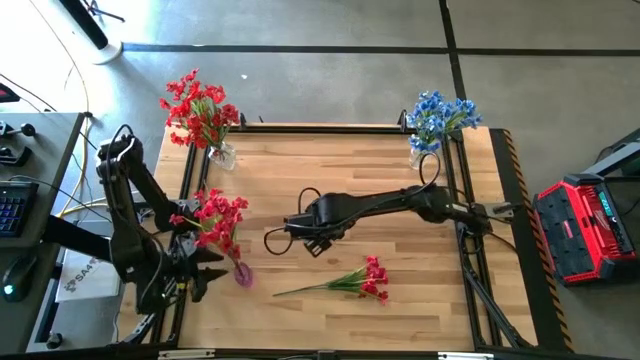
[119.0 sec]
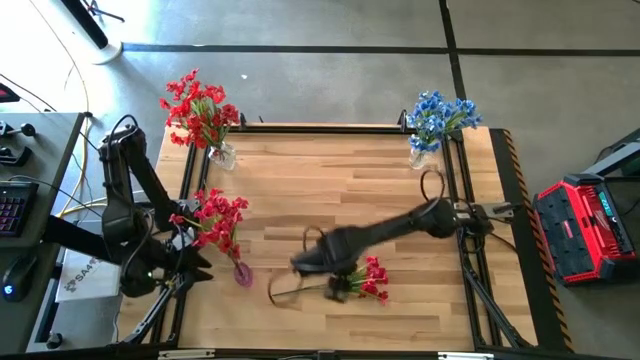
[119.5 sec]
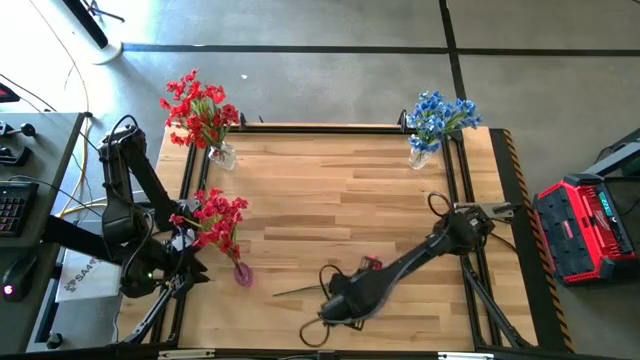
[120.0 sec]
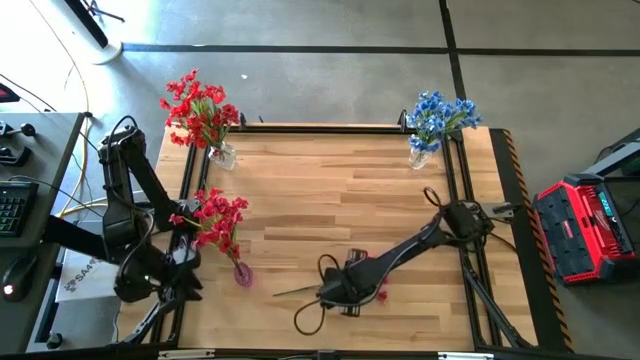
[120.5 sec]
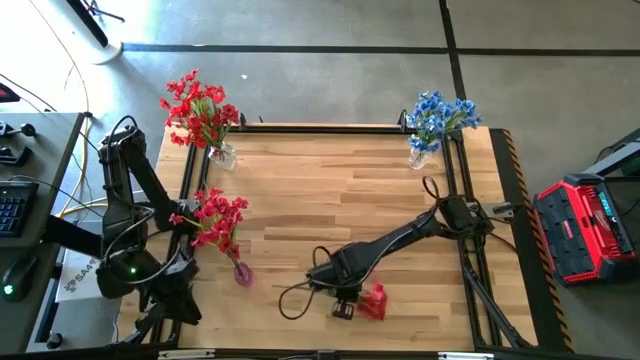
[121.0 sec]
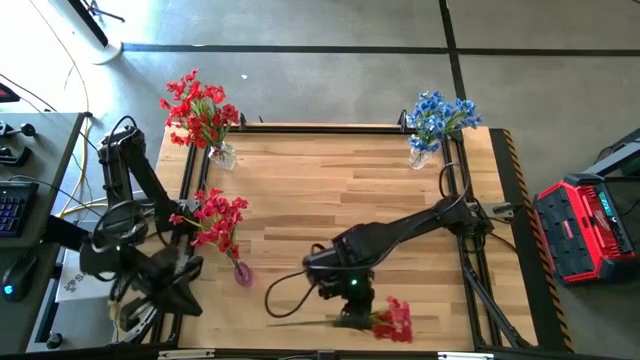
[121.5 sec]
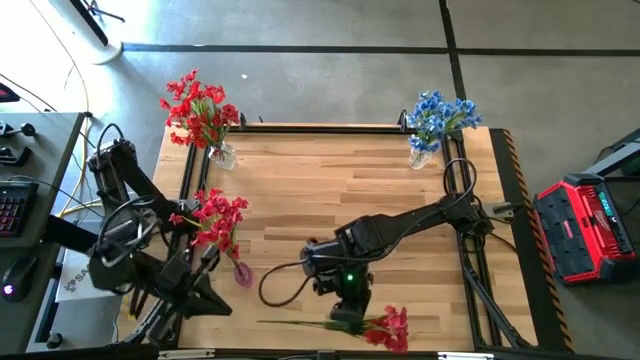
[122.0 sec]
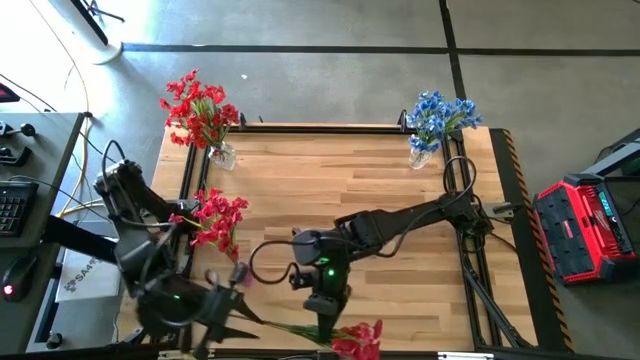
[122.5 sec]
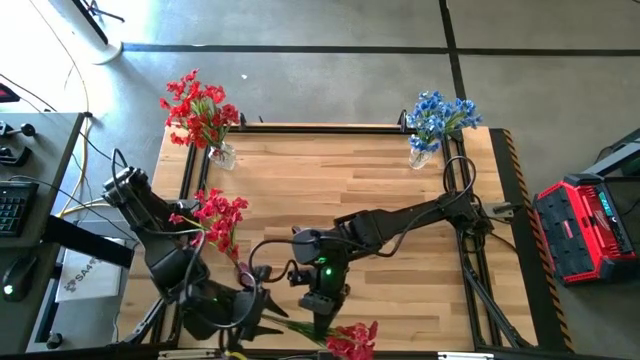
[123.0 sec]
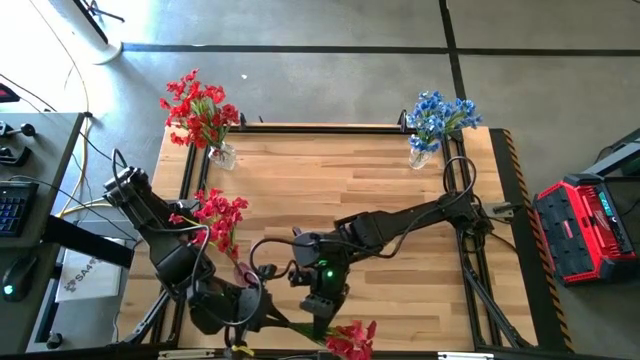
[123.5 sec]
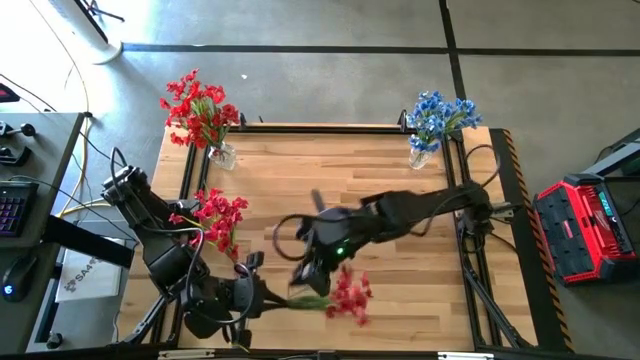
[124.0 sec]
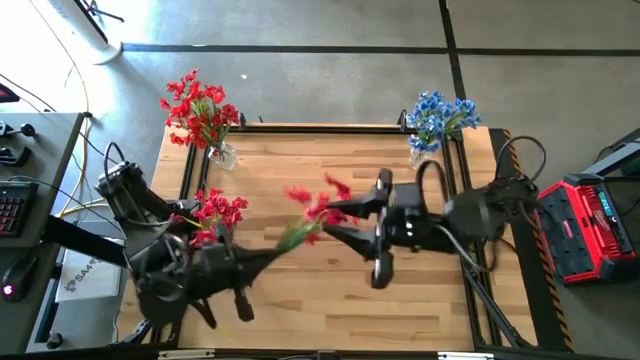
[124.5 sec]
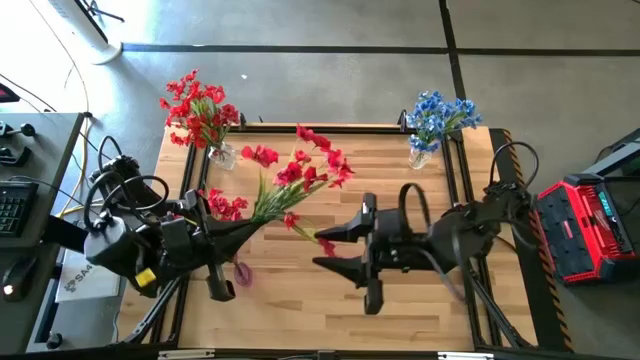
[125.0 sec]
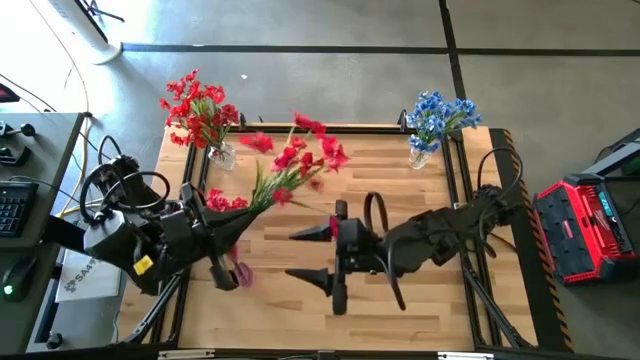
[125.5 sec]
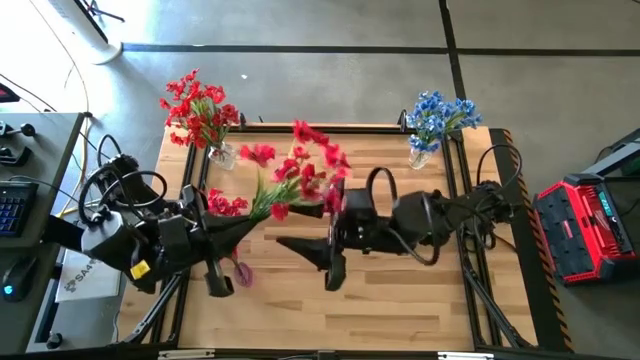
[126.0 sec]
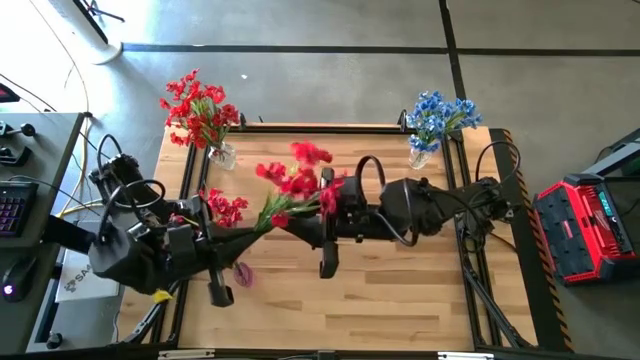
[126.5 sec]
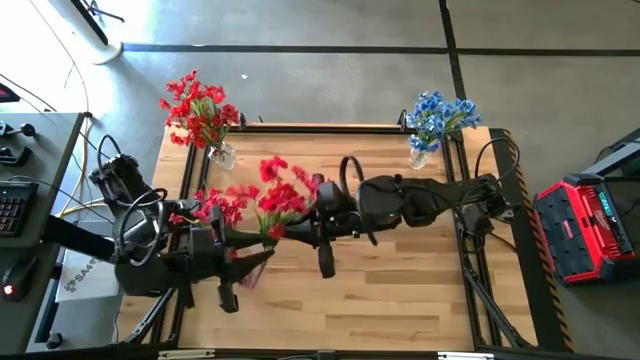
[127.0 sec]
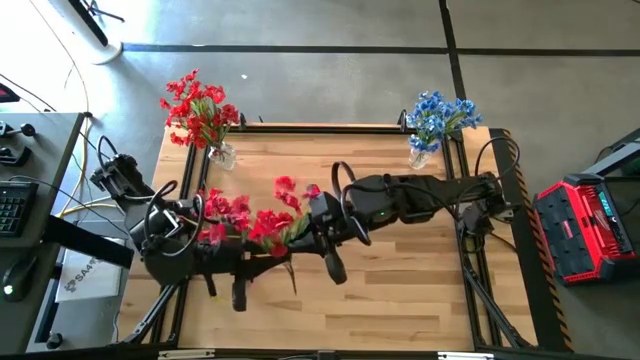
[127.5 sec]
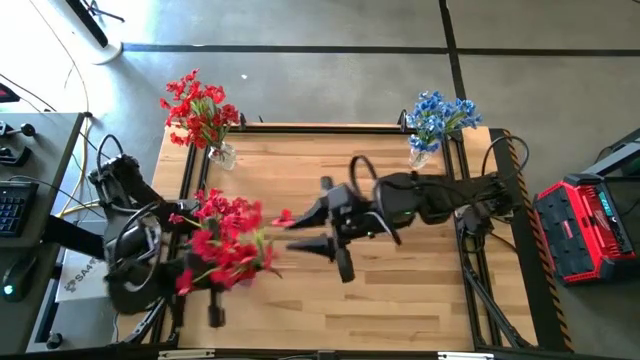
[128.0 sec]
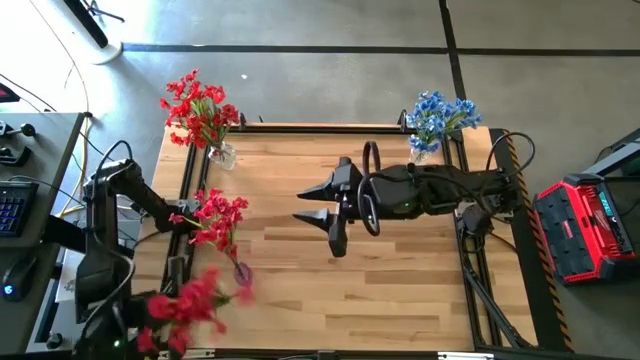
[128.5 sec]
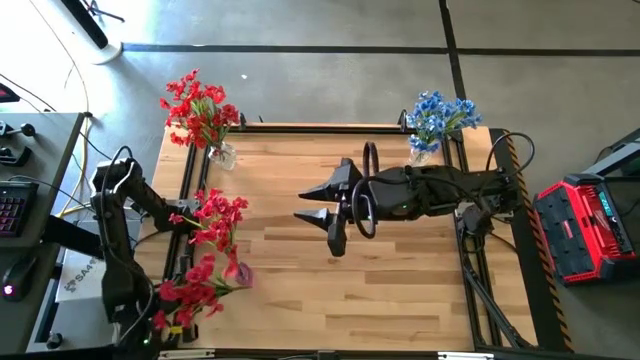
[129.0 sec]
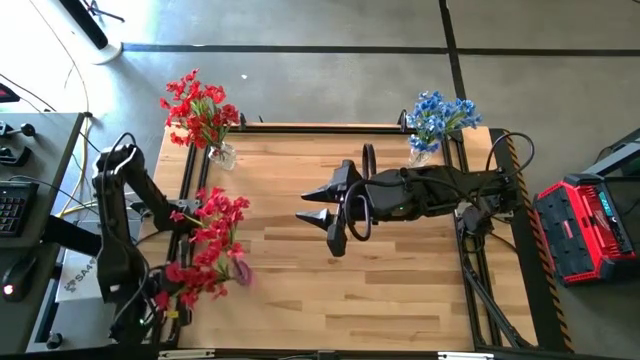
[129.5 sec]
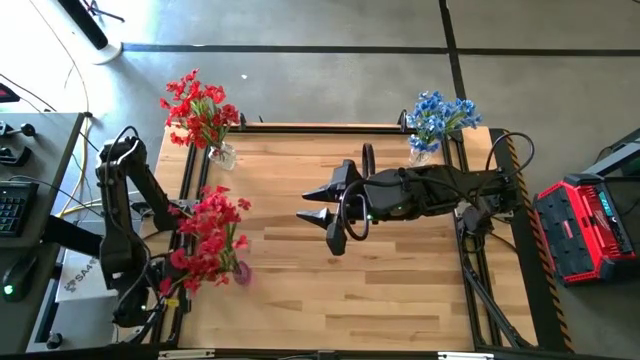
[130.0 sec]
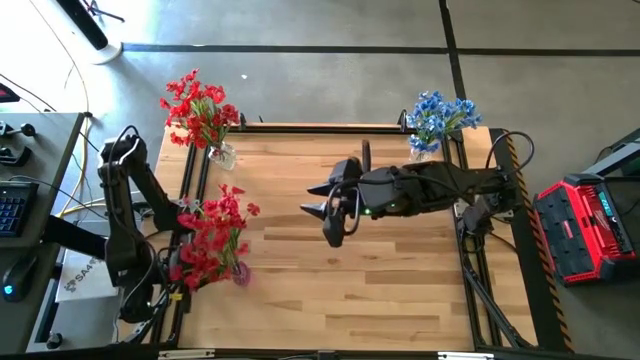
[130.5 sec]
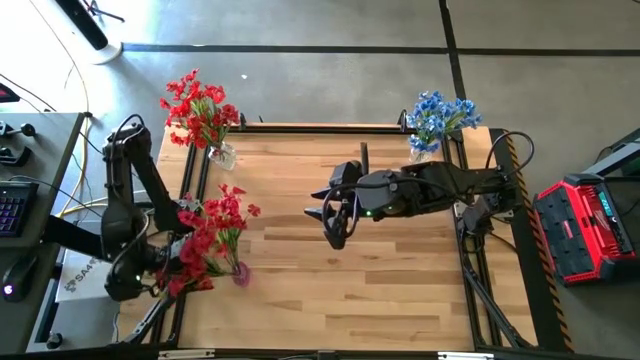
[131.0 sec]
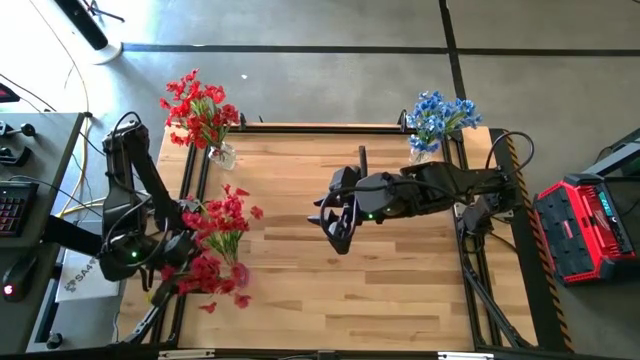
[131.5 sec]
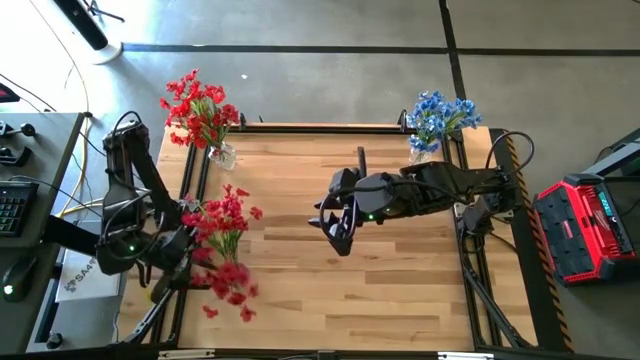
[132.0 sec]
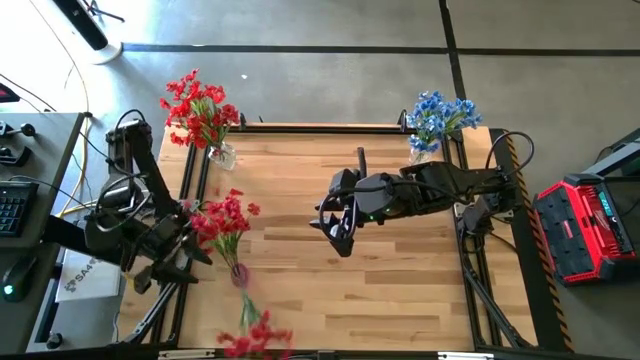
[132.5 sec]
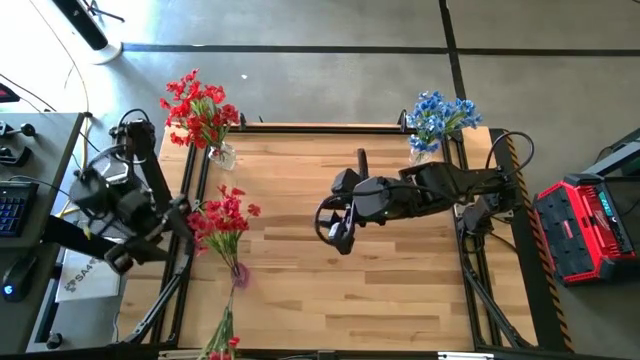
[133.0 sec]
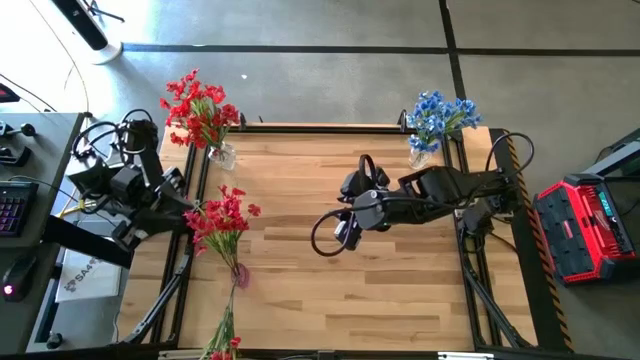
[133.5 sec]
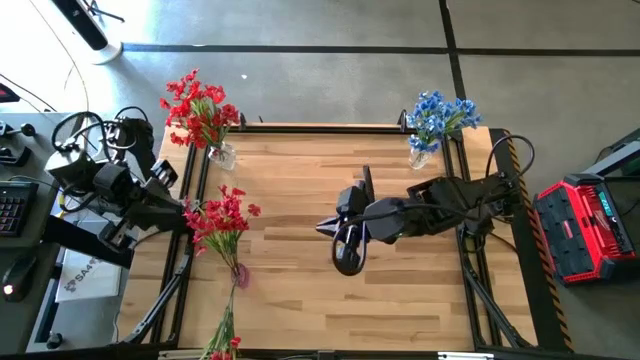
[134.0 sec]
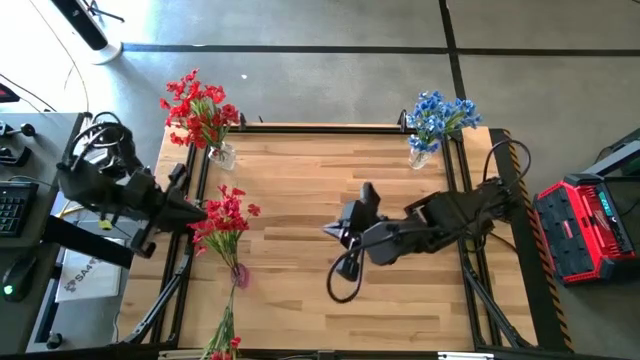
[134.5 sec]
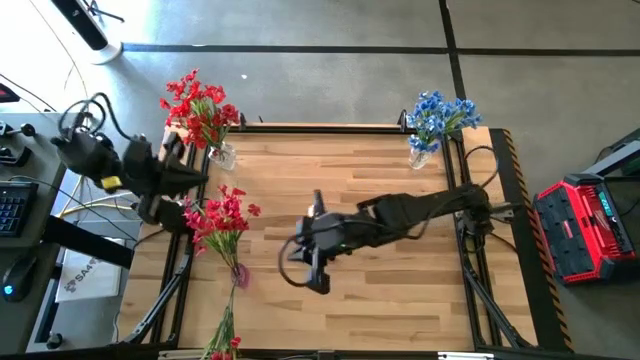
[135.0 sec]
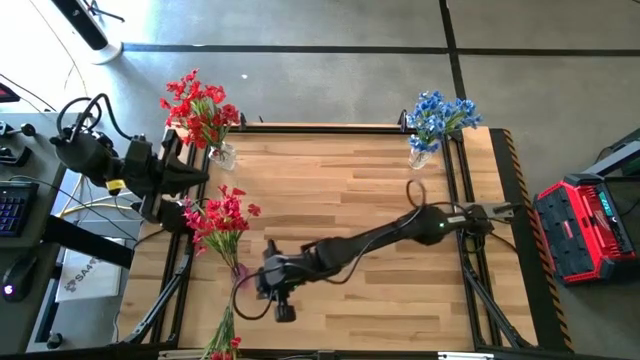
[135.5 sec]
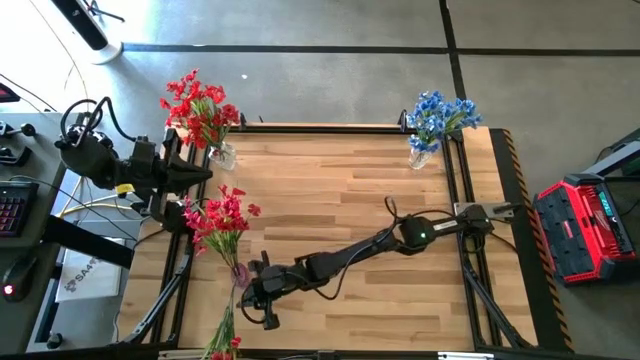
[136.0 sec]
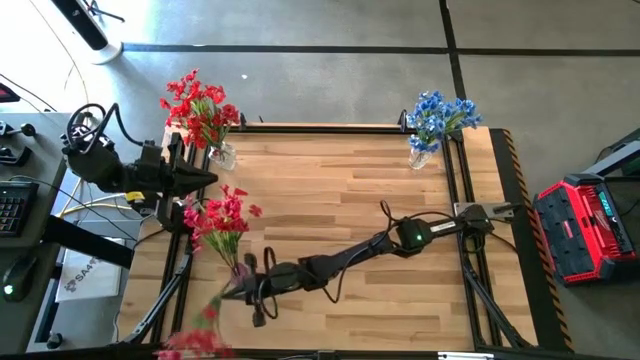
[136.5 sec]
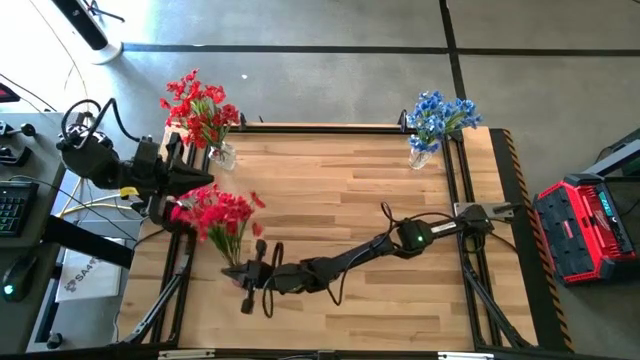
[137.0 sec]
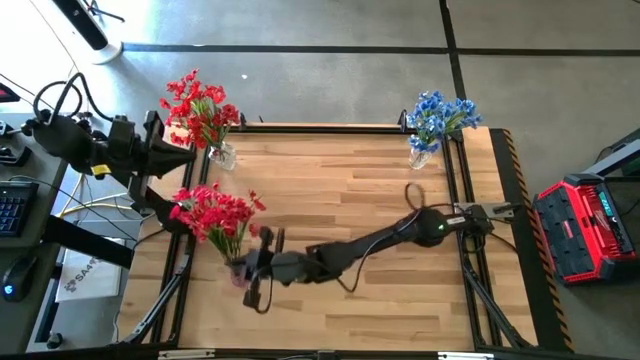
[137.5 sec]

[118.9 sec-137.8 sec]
Task: Sort flowers into vase by color
Put the red flower into the violet transparent vase
